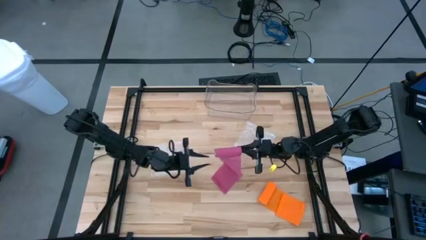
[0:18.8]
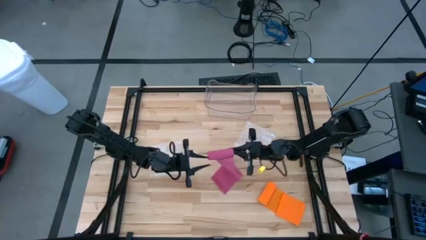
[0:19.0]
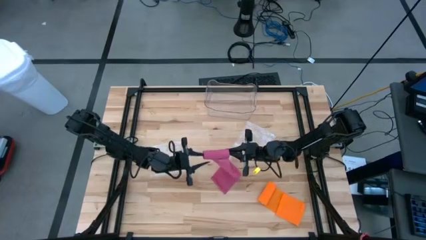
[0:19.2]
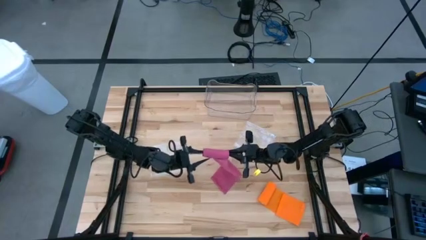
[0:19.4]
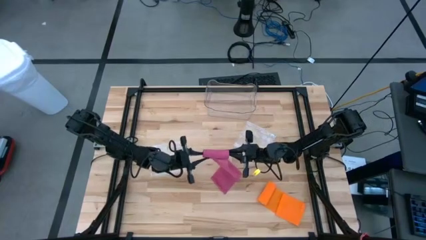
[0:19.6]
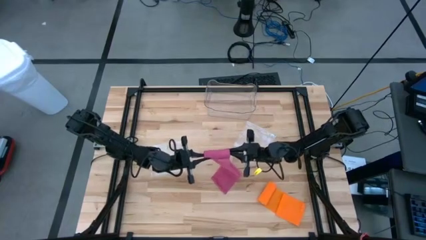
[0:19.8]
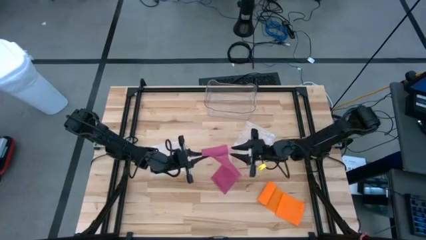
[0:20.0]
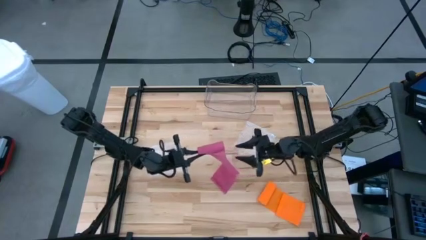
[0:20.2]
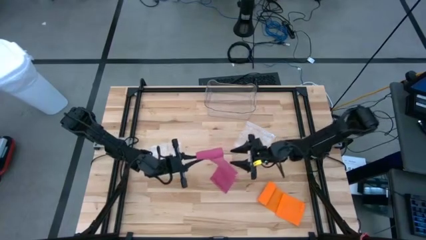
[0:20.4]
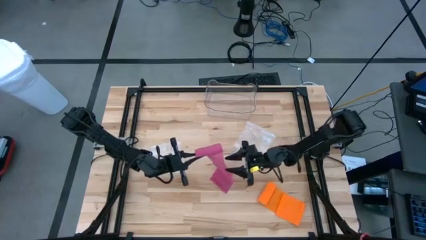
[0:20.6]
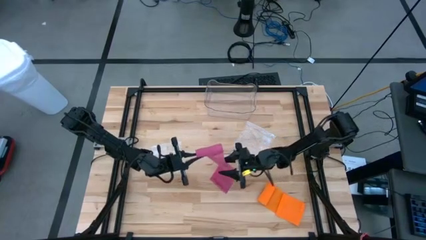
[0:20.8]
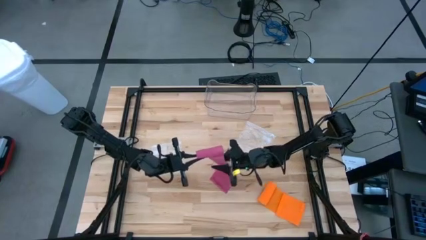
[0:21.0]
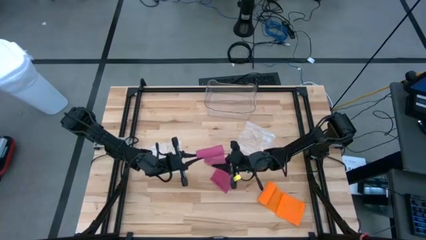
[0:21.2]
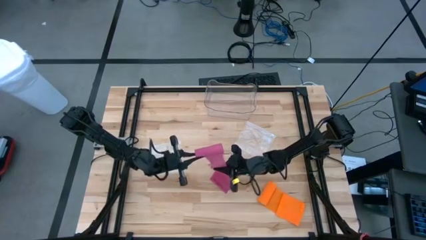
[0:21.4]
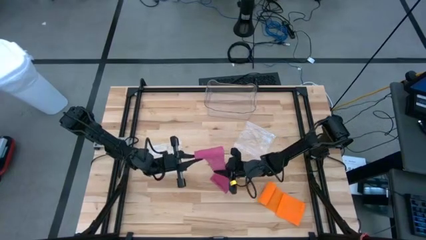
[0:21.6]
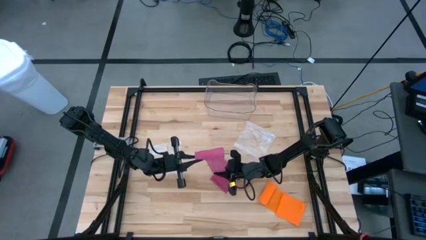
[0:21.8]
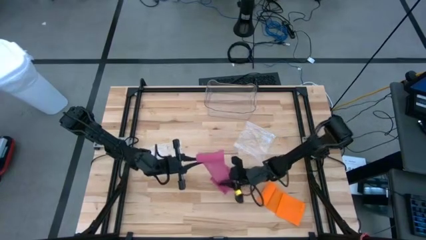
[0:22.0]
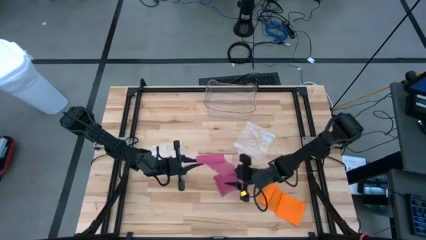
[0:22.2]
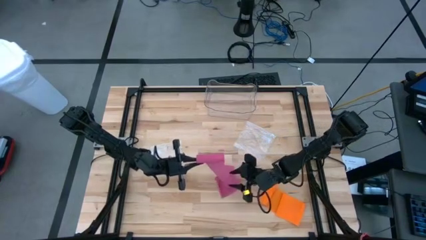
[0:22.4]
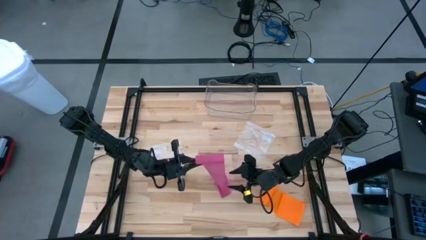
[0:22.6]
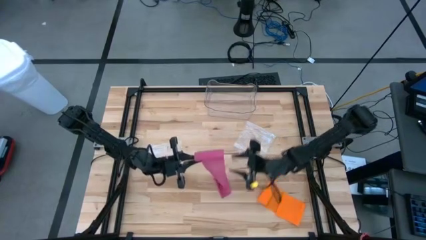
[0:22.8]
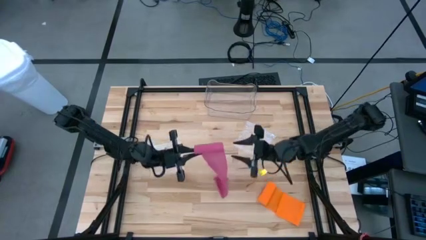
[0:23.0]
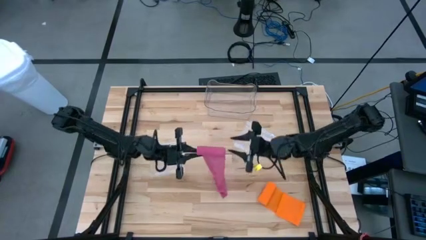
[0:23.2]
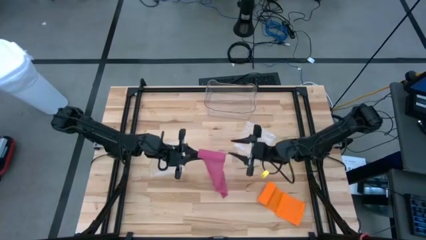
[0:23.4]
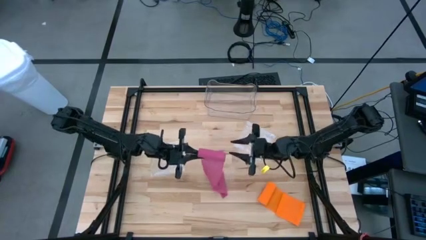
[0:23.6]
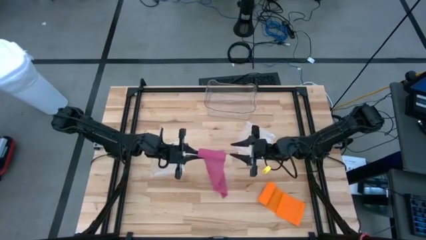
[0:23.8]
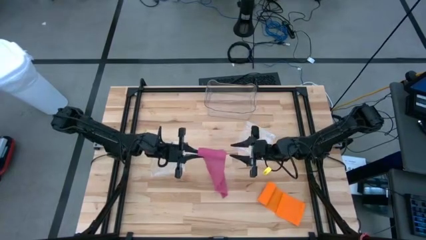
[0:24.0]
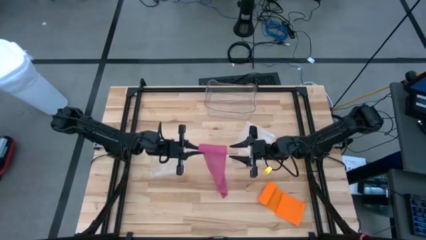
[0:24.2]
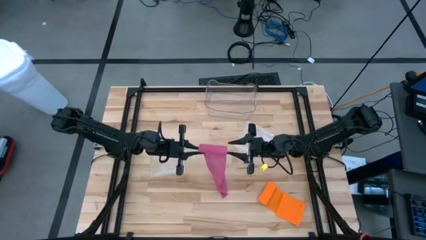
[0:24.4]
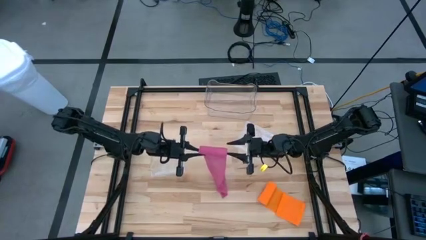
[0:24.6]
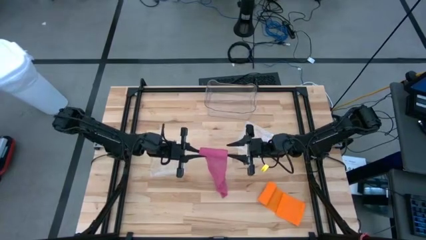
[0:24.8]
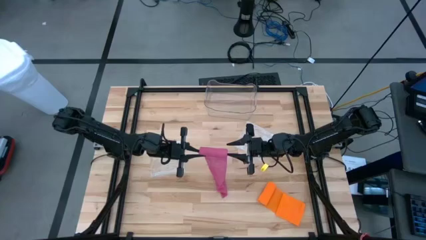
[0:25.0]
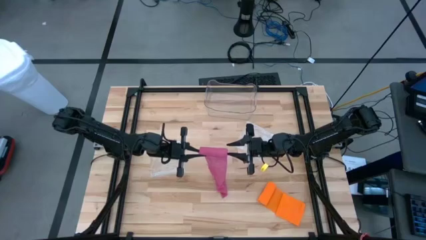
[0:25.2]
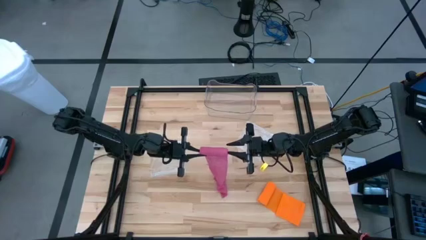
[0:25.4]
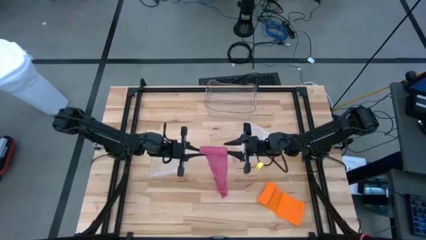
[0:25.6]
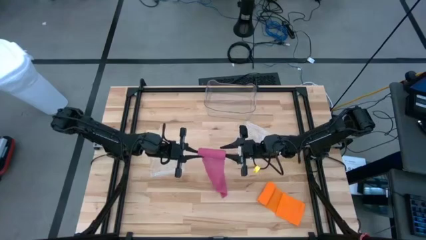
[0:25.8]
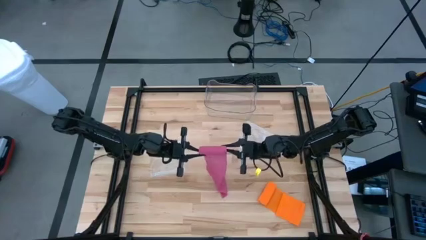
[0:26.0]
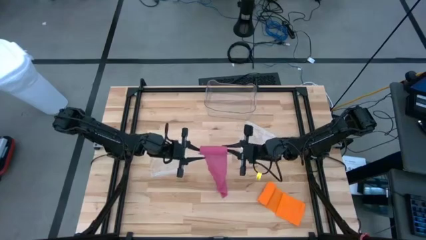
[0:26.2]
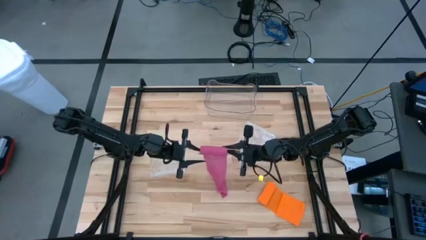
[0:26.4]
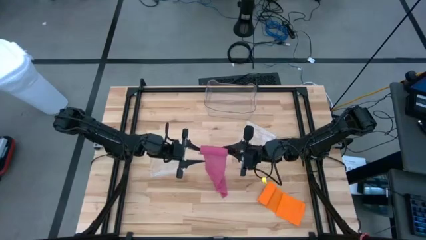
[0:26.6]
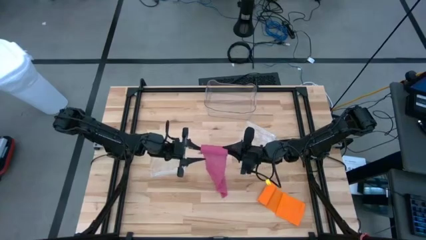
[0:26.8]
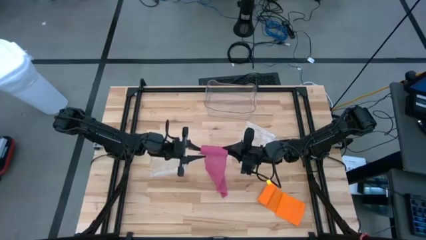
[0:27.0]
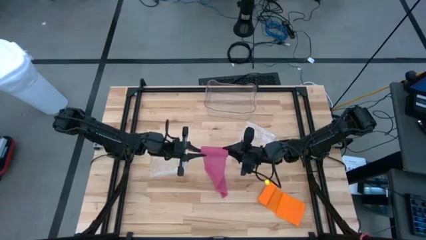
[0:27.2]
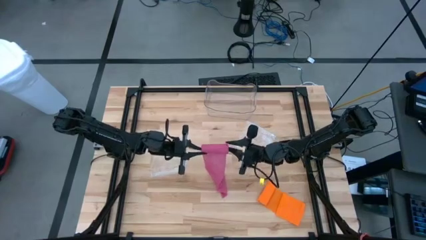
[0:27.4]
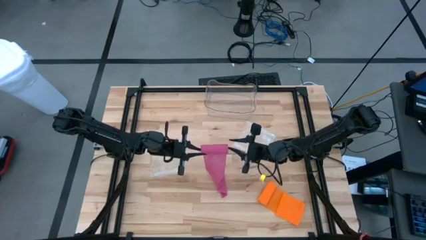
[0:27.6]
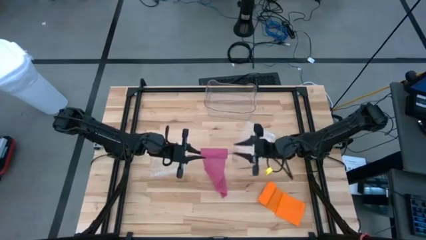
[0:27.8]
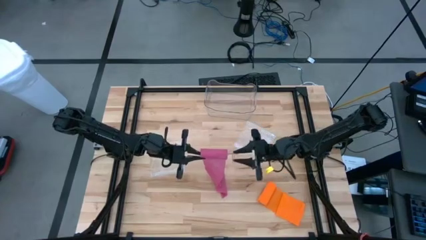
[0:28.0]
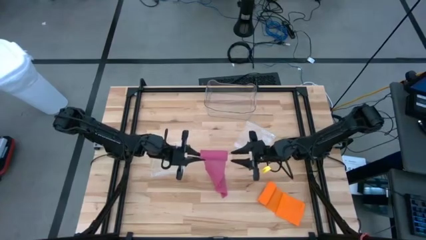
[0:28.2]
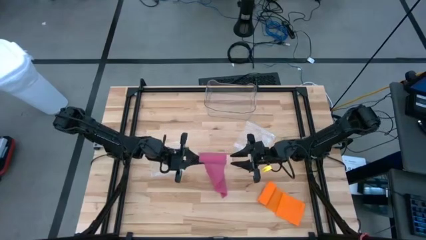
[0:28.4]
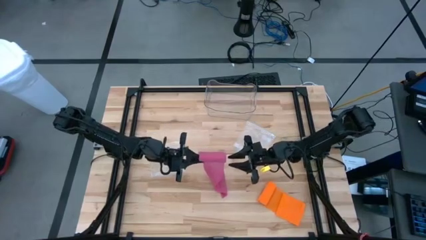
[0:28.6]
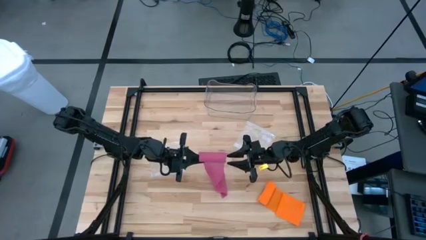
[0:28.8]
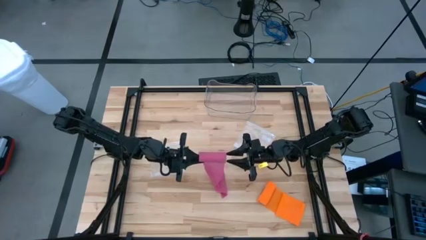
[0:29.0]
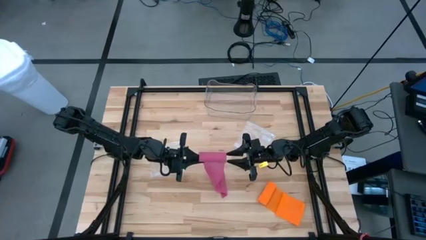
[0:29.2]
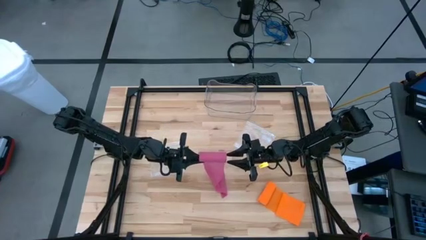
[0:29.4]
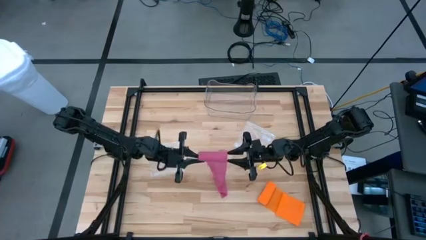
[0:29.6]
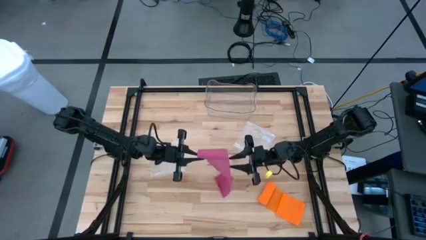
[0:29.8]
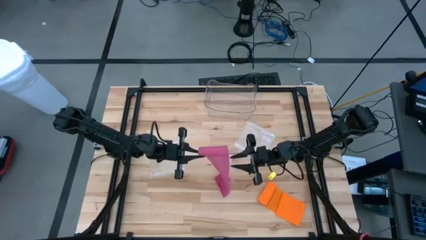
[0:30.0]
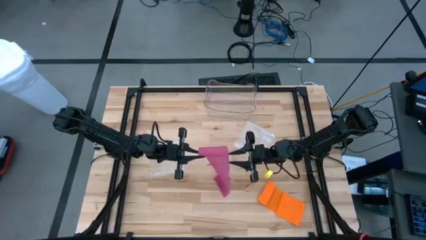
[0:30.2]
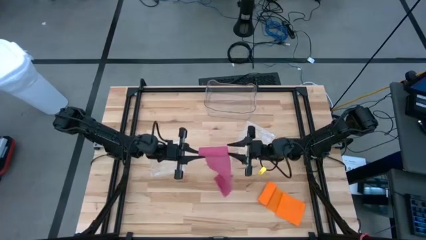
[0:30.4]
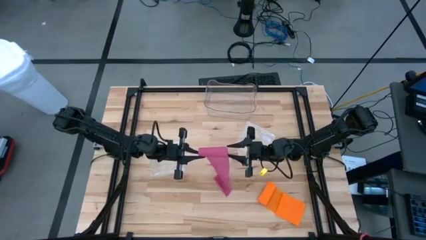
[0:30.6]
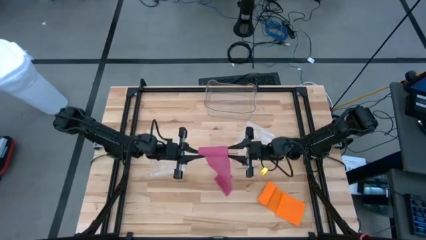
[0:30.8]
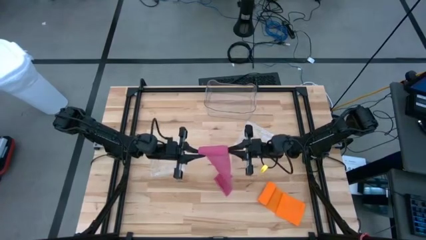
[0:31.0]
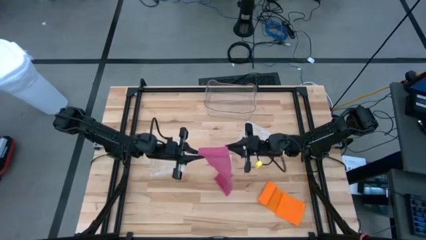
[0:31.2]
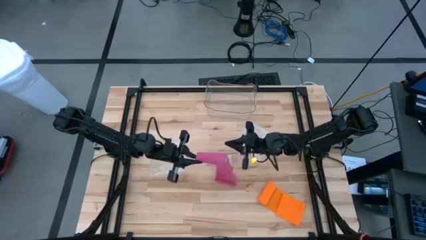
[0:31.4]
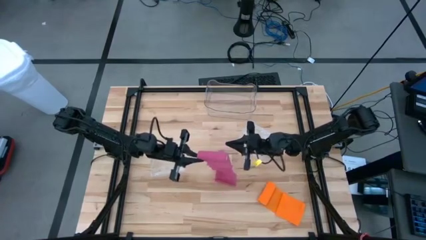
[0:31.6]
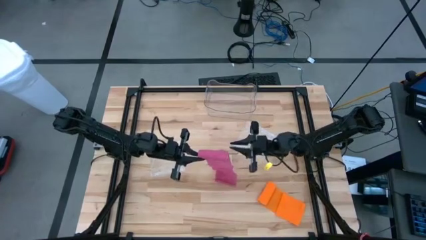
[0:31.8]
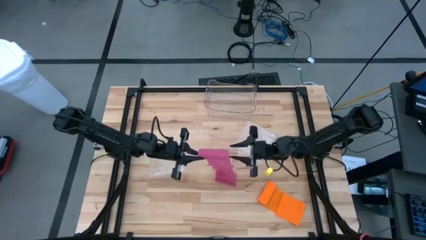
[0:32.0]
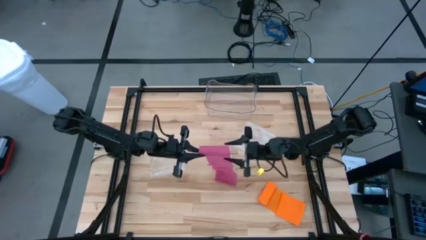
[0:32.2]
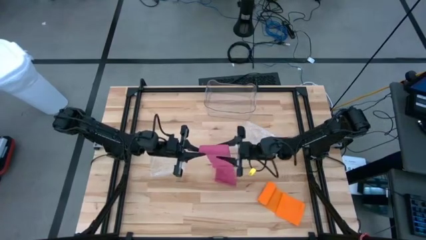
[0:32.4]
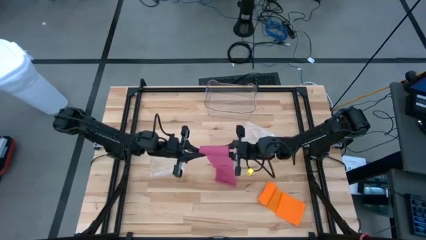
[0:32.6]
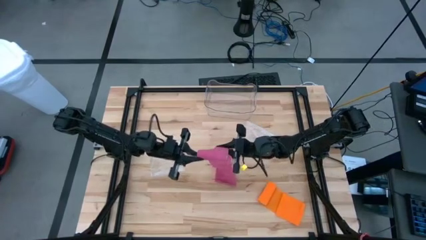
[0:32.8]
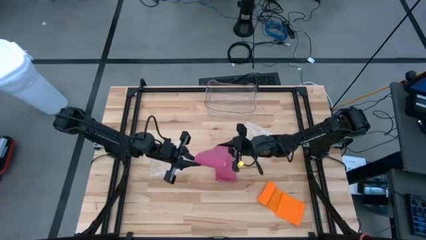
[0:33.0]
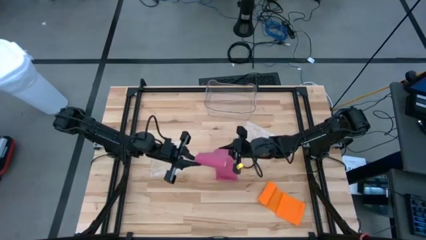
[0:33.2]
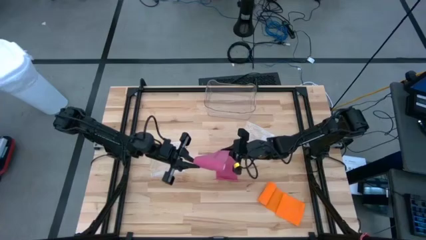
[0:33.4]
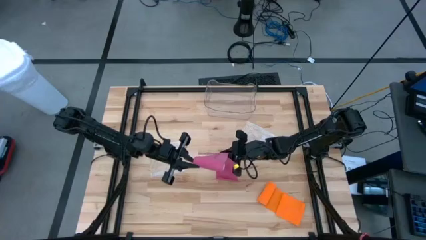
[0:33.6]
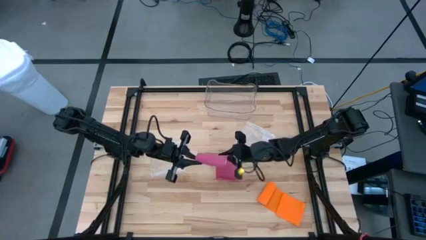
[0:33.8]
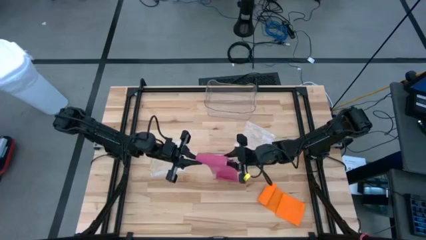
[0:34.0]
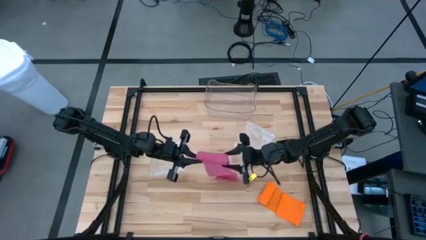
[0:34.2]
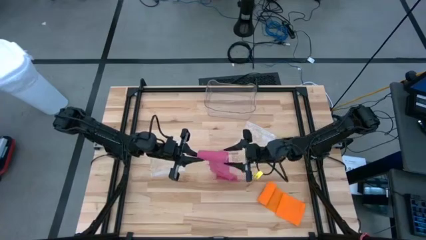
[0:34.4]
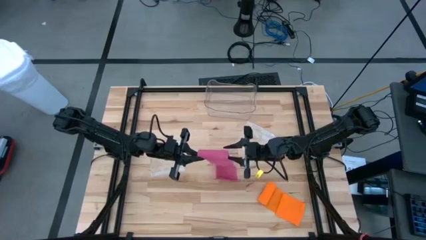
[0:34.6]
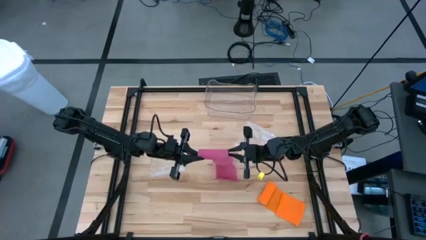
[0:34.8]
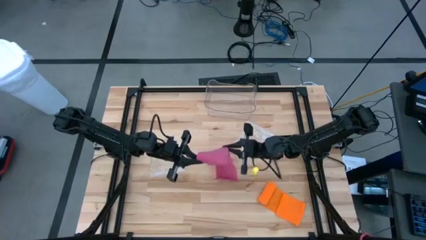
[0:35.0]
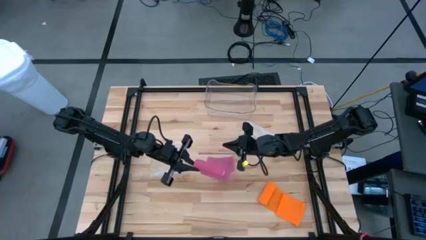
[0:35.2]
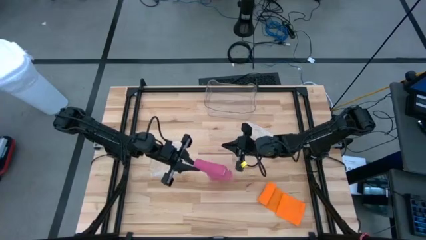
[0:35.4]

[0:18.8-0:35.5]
Task: Roll bandage
Roll the pink bandage
